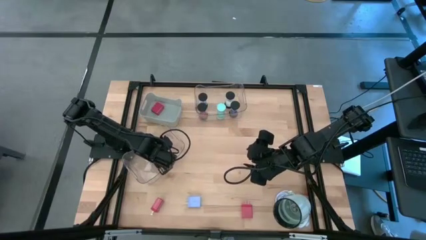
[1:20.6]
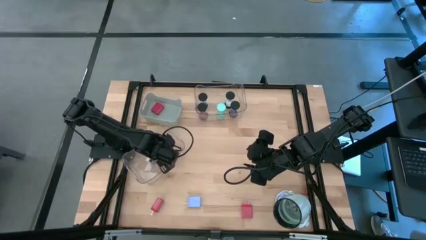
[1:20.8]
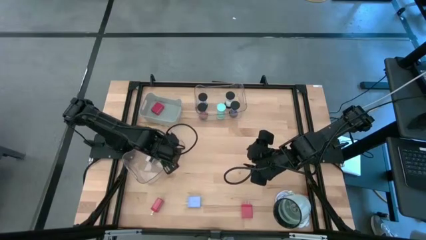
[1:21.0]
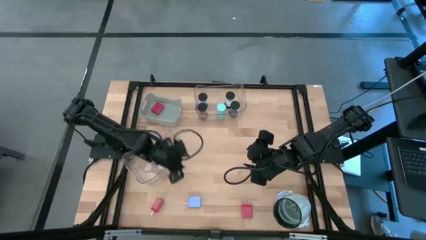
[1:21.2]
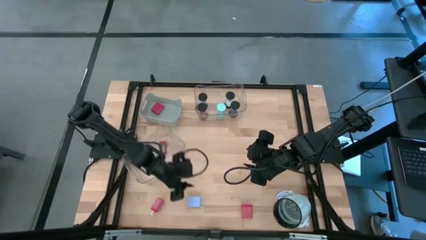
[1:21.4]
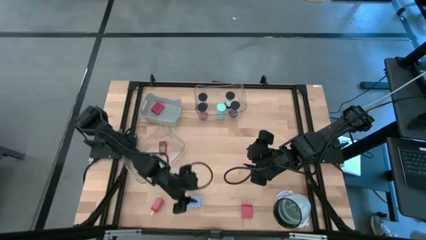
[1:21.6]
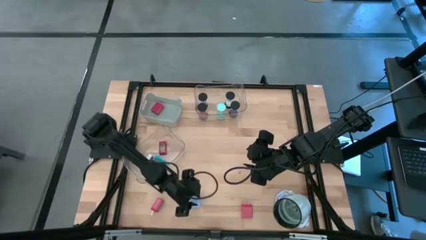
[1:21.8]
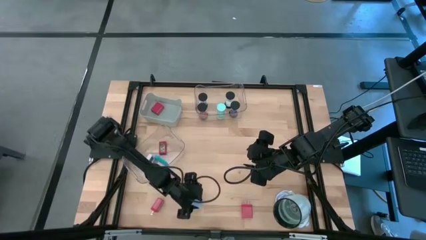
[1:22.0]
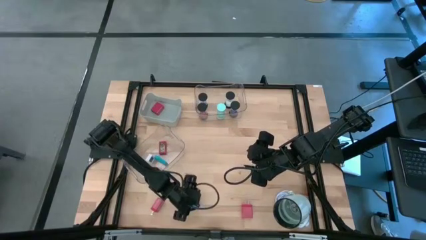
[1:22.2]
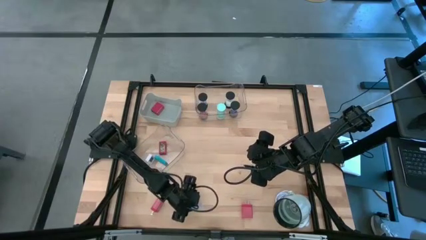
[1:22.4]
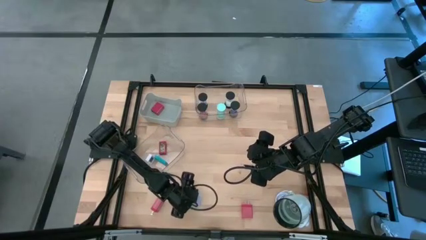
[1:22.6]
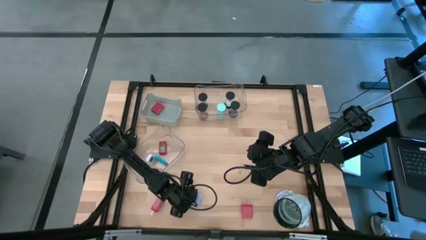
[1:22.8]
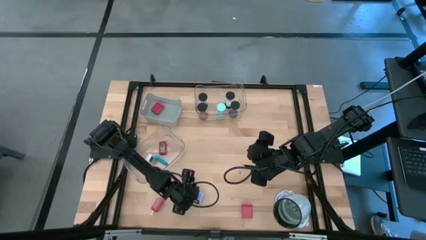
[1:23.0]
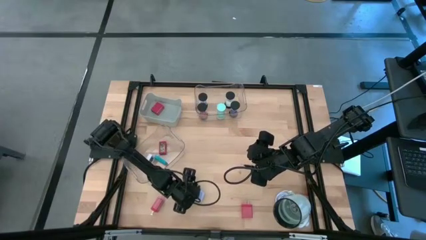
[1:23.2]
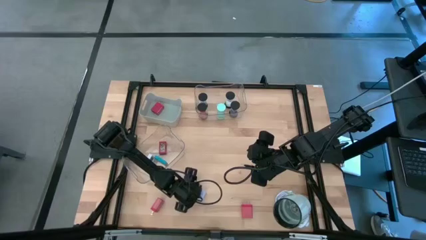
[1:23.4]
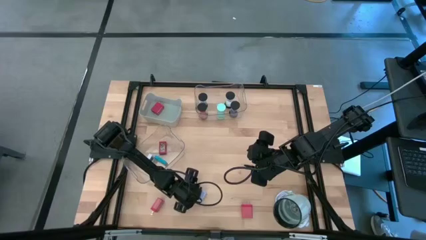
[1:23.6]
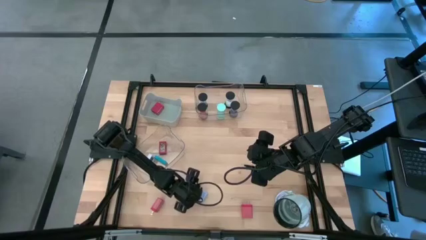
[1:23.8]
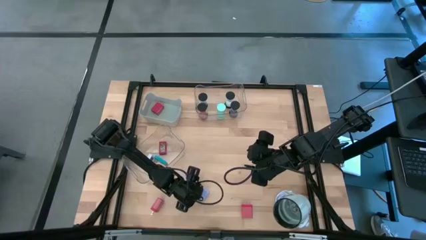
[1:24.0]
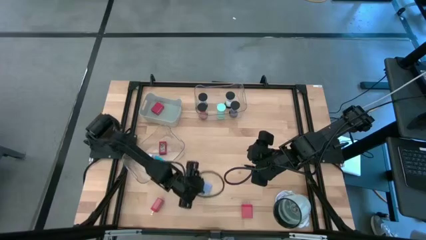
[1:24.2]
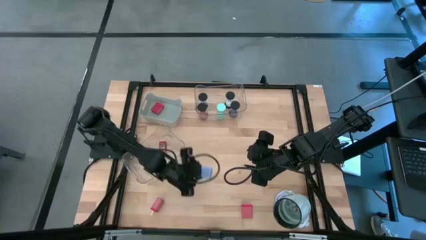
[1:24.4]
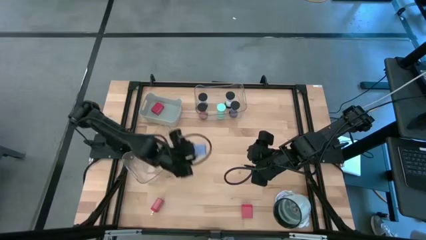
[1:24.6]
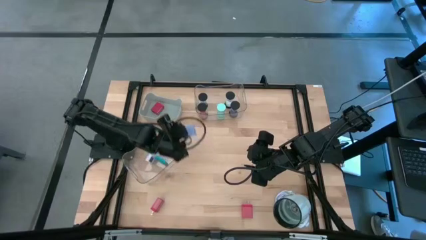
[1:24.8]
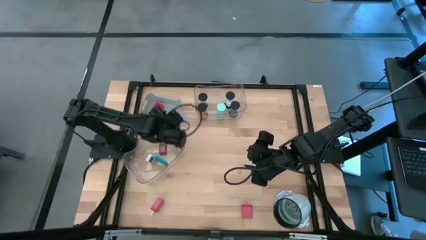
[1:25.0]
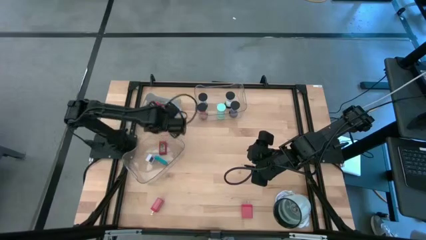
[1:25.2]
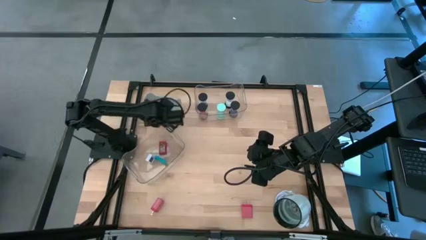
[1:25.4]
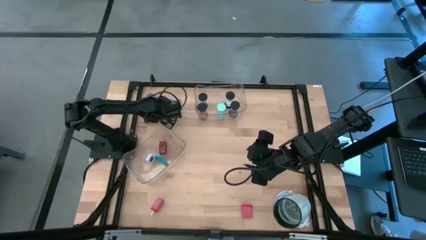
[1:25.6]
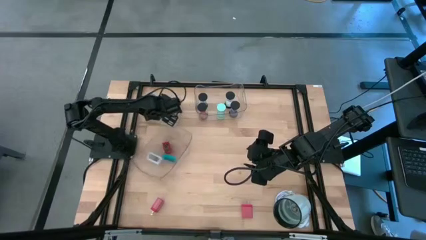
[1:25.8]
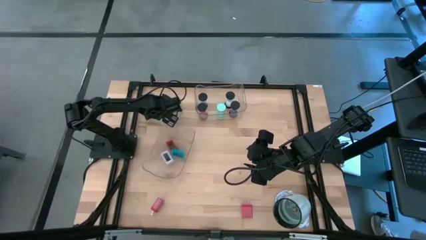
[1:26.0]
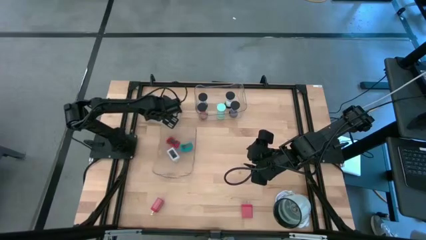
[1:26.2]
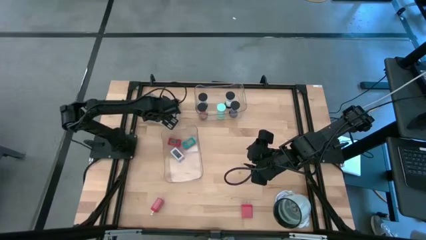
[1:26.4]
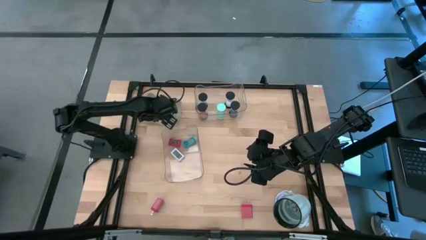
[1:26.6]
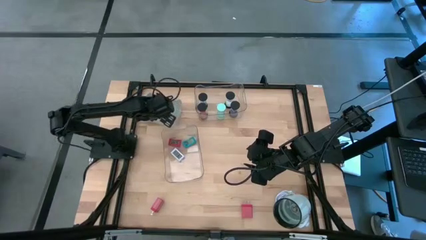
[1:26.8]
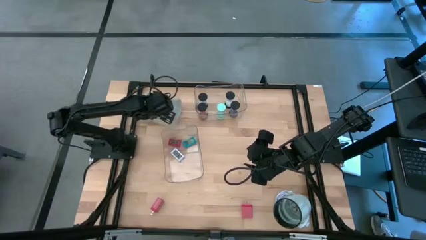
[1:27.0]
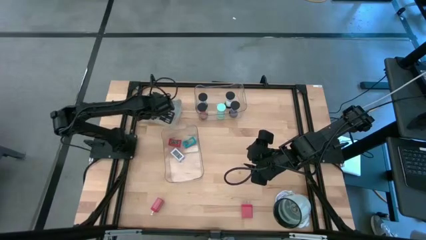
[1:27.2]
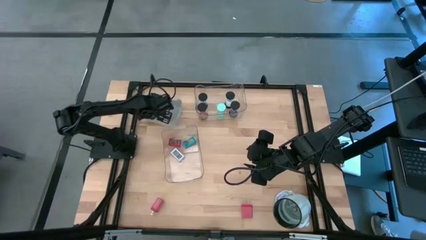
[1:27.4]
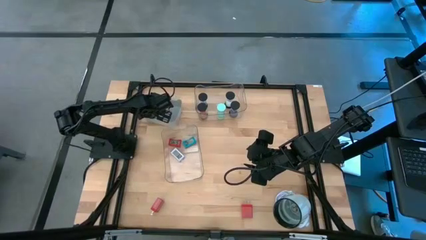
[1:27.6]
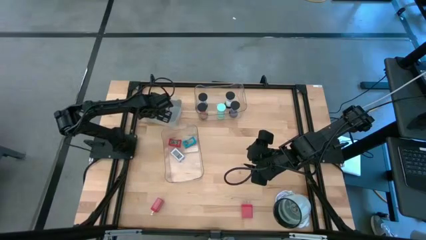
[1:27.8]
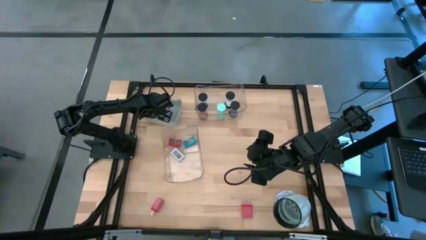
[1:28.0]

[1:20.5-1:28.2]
Task: Pick & Place Office items
Put the blue charger adapter into the gray bin

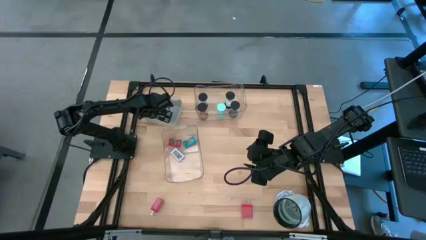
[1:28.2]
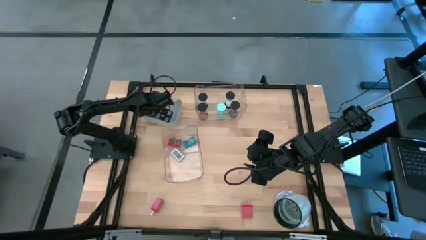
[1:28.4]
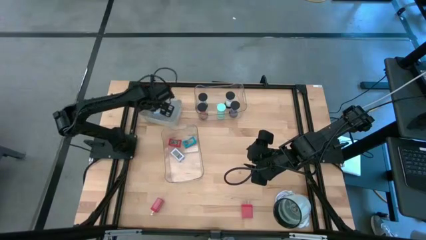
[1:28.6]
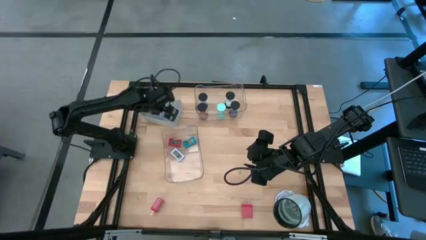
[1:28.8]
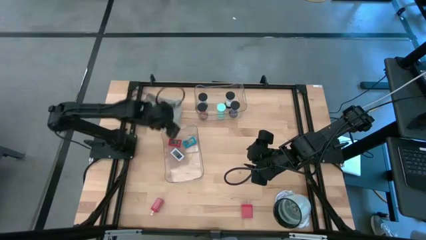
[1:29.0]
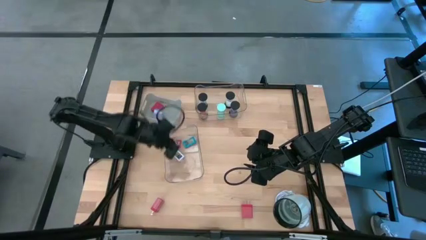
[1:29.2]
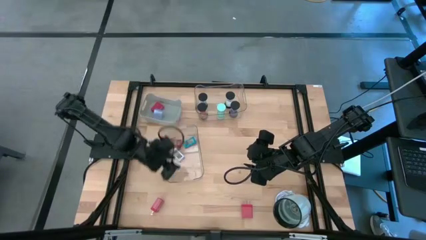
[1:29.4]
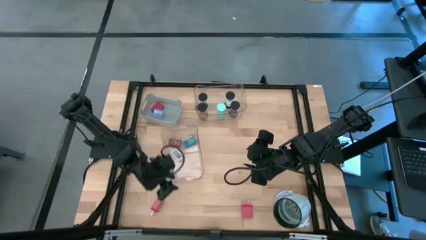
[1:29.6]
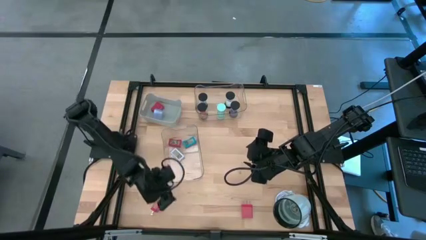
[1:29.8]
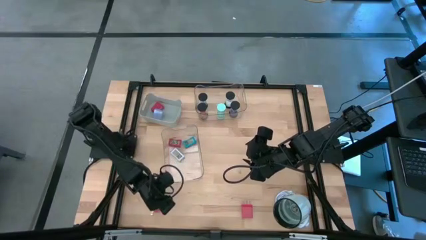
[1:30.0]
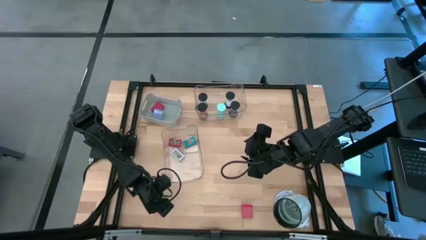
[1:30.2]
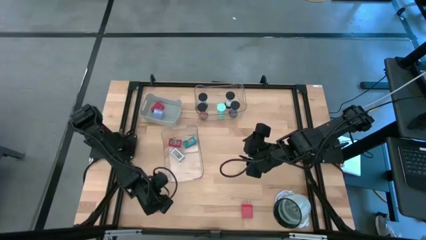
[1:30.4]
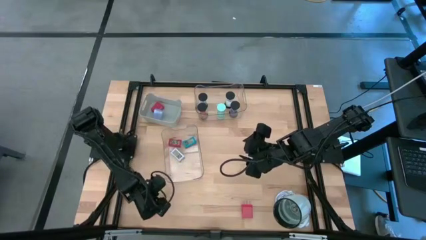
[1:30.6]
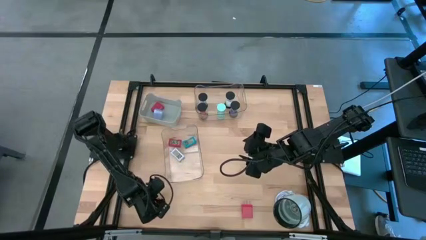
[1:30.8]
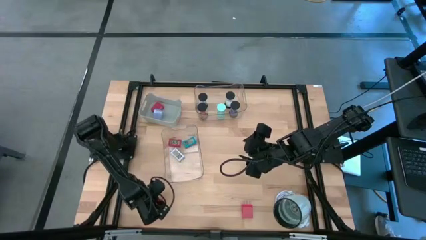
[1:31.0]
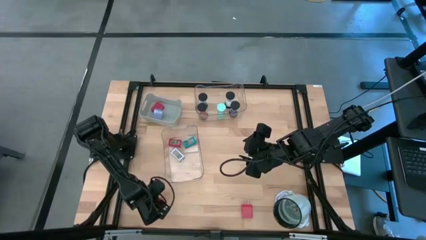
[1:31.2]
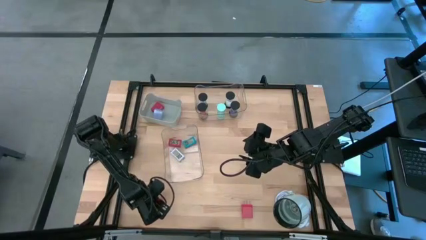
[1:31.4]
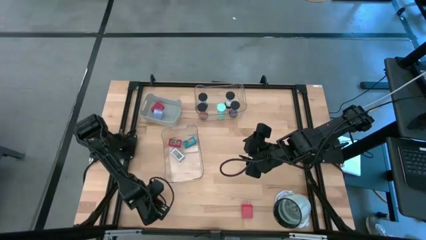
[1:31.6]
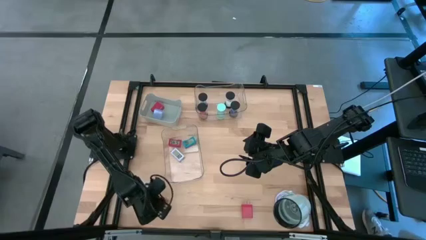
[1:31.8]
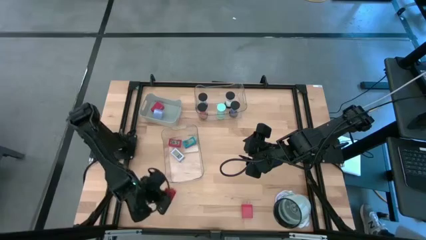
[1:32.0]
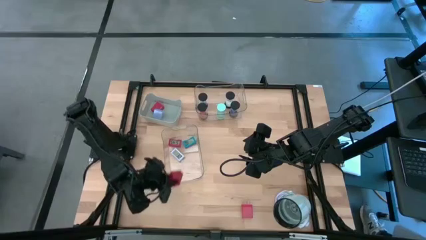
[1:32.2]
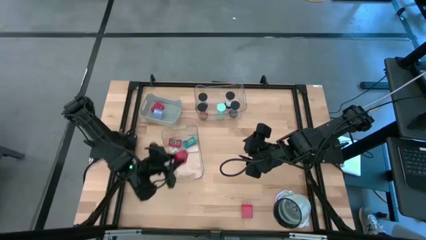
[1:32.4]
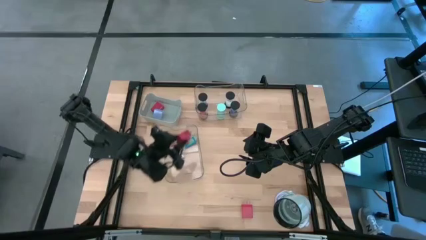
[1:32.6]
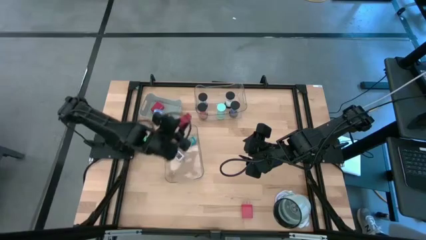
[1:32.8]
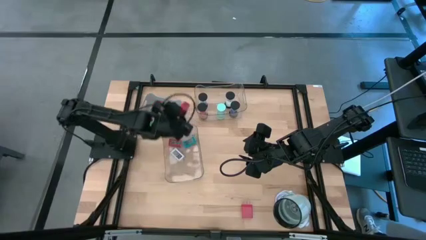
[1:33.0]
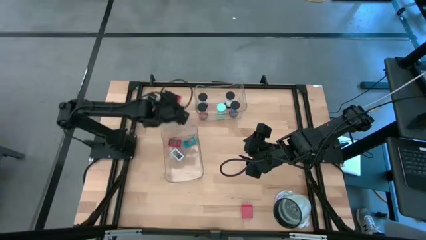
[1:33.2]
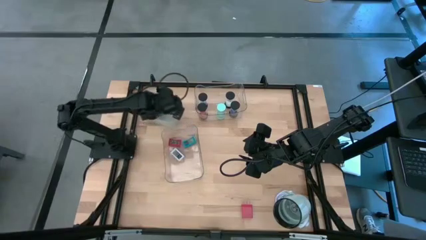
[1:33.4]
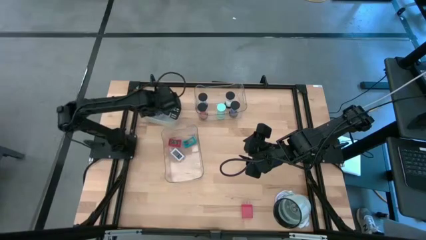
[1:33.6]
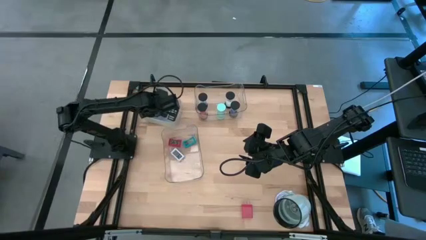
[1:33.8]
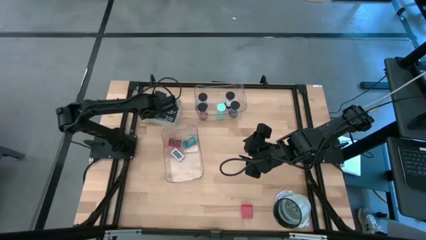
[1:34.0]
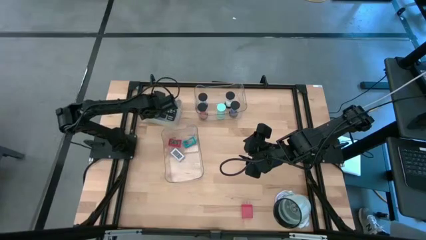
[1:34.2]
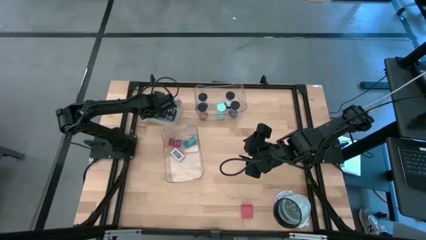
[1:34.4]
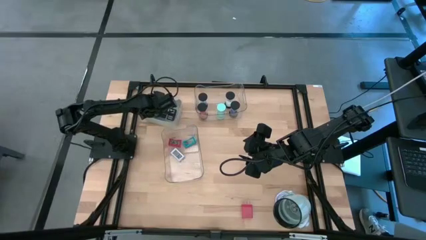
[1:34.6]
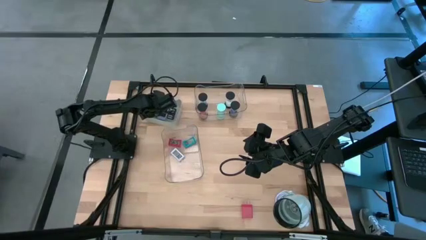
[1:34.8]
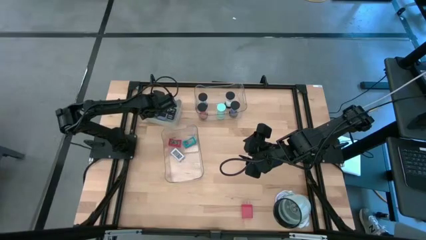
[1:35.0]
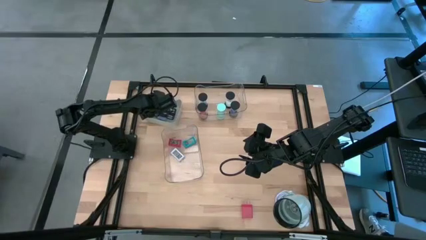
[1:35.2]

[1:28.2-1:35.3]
Put the left red charger adapter into the gray bin
